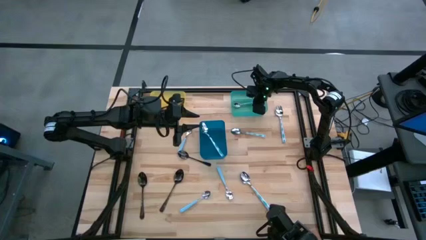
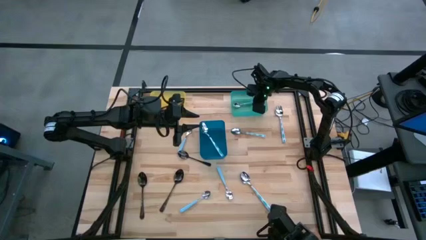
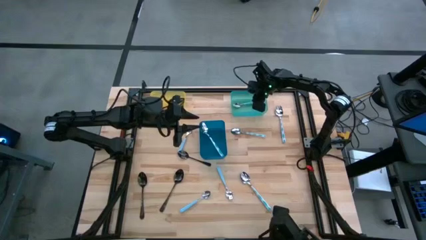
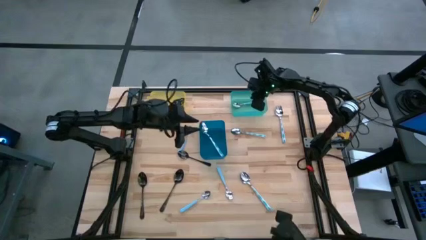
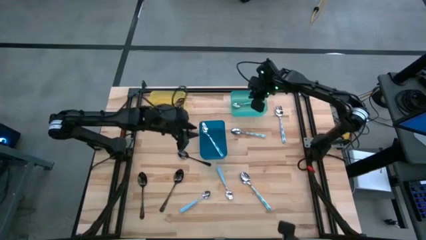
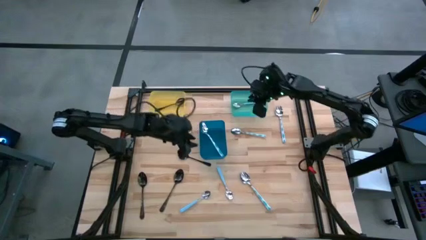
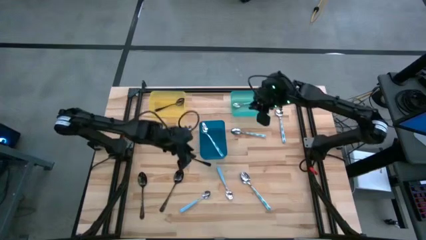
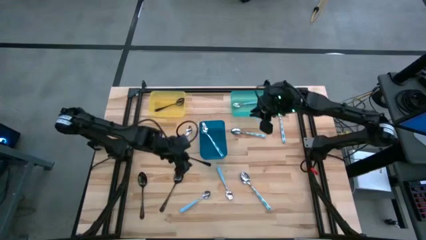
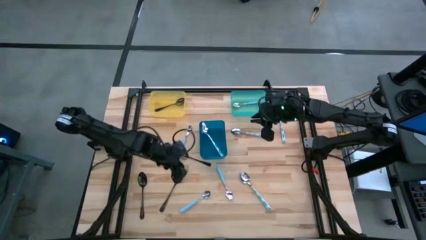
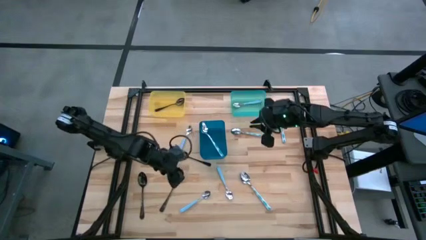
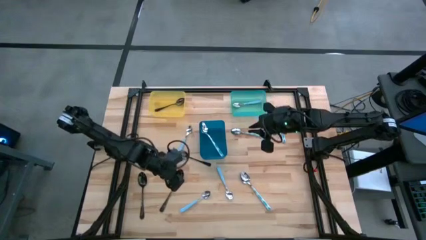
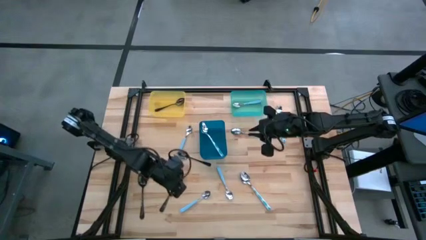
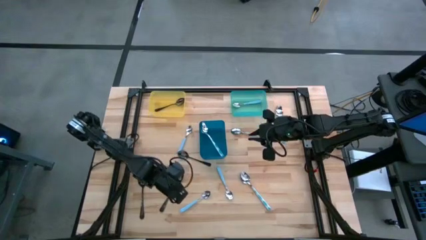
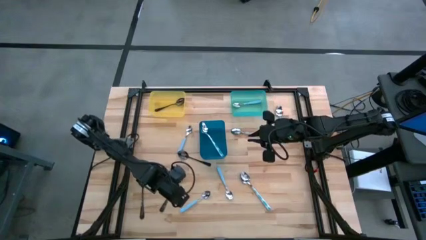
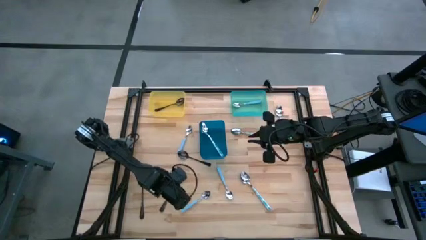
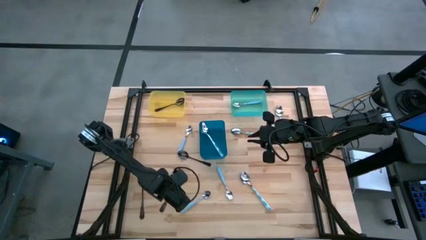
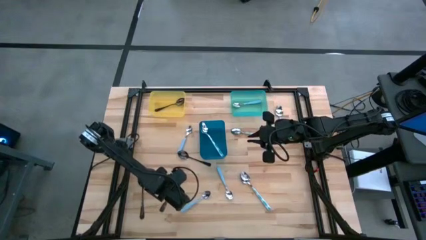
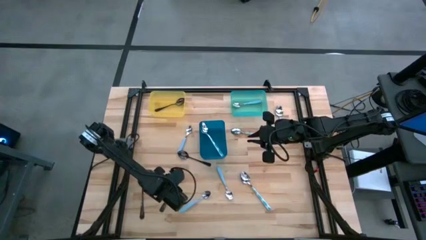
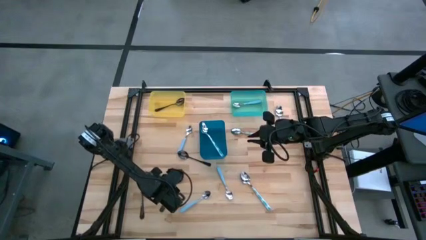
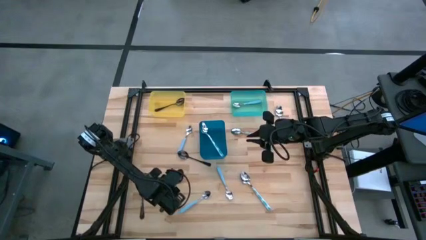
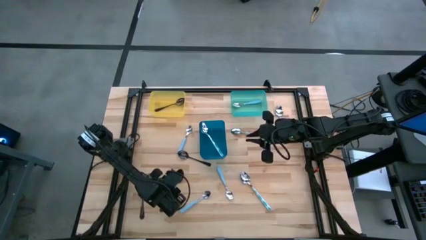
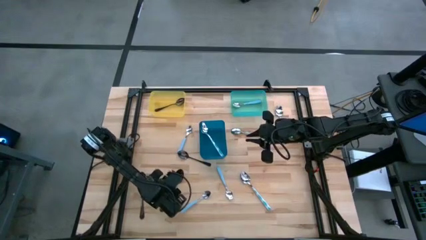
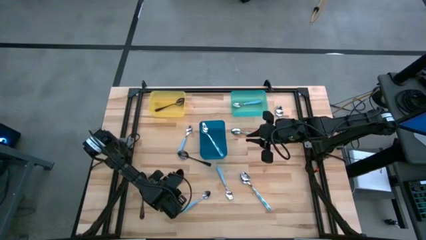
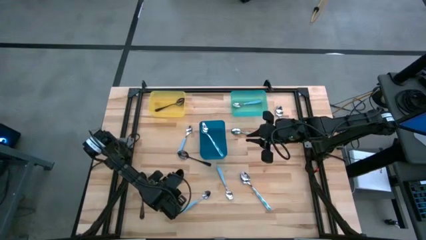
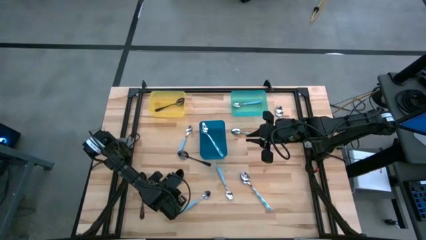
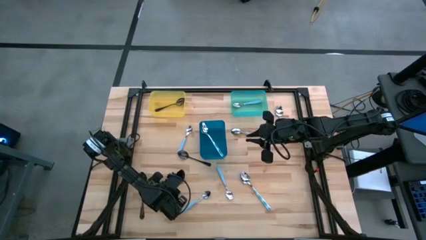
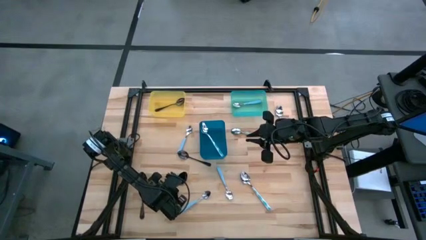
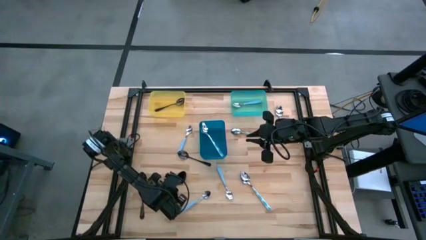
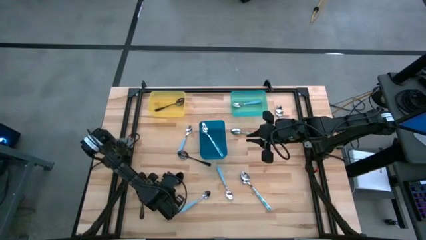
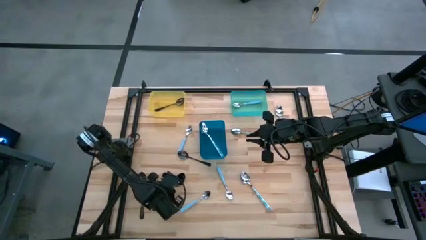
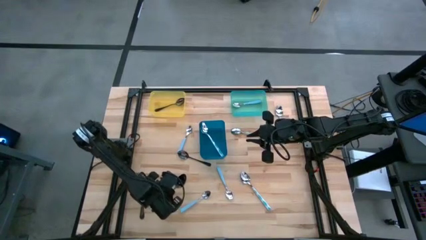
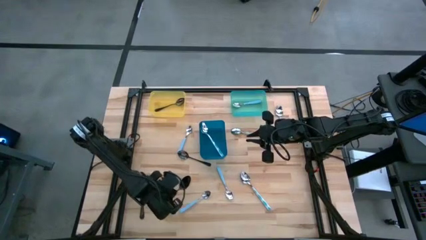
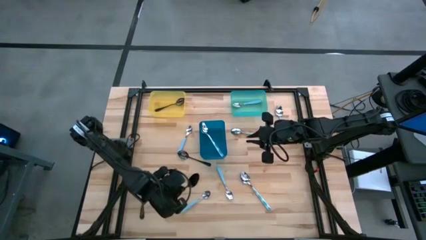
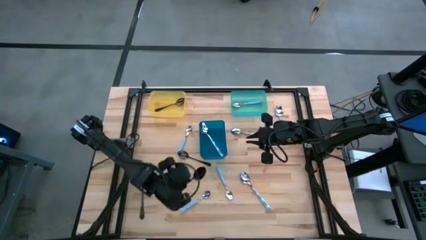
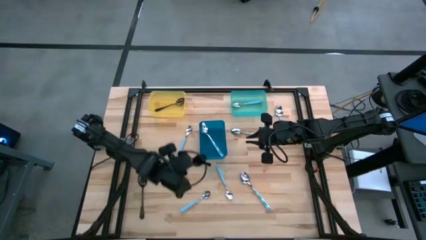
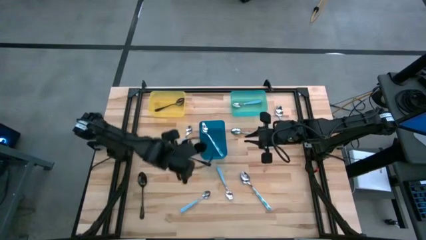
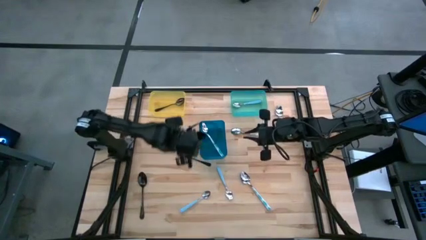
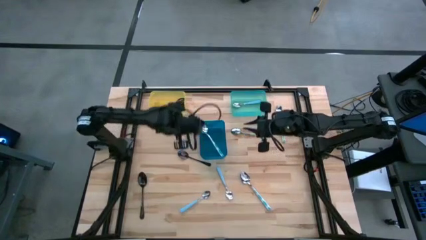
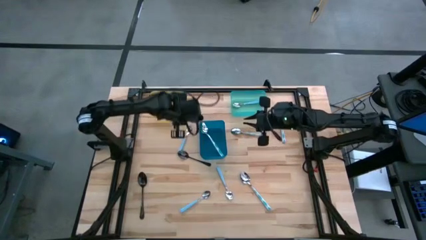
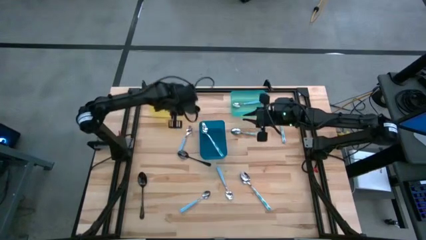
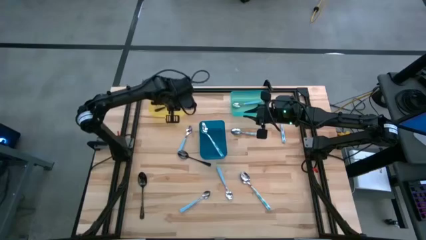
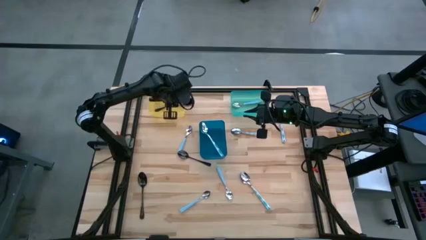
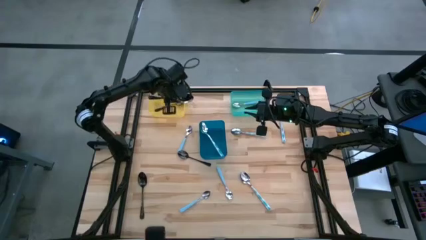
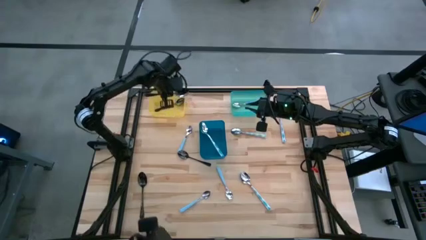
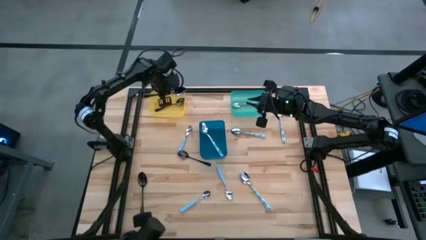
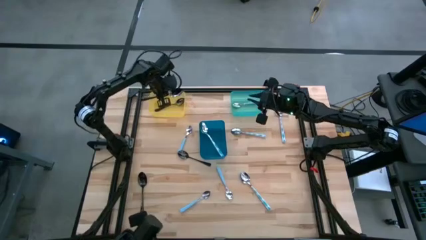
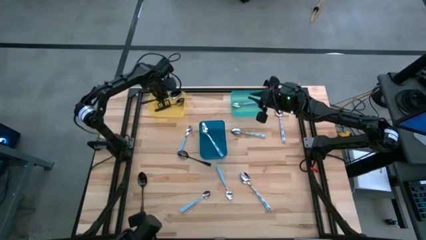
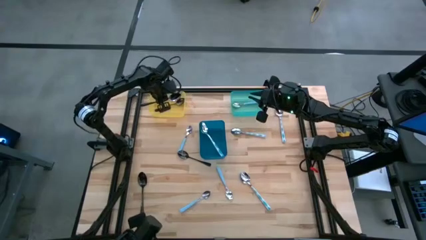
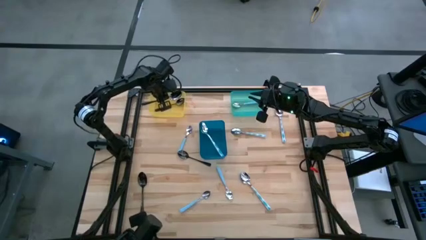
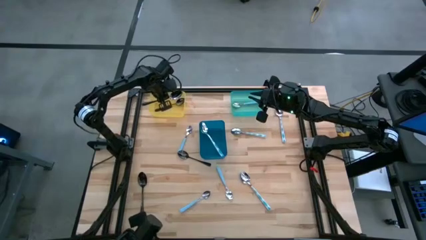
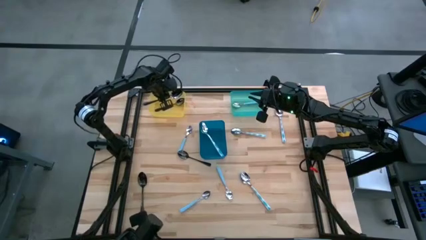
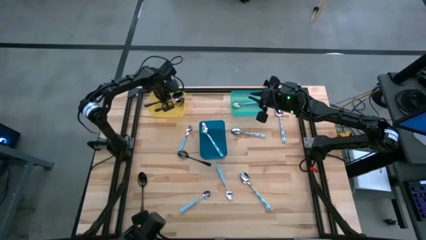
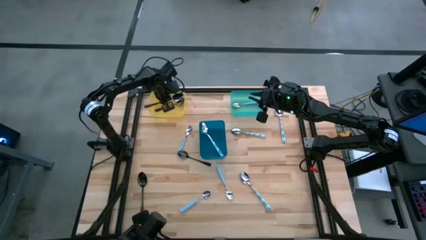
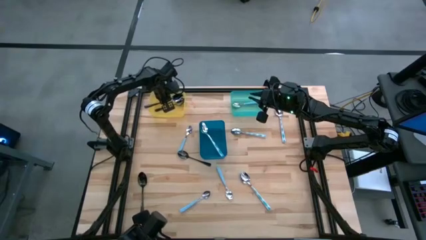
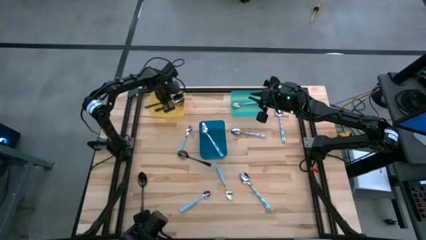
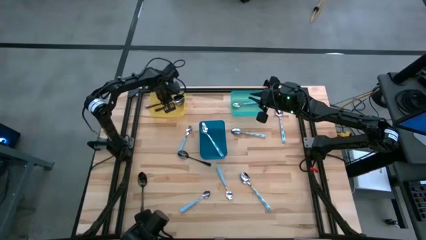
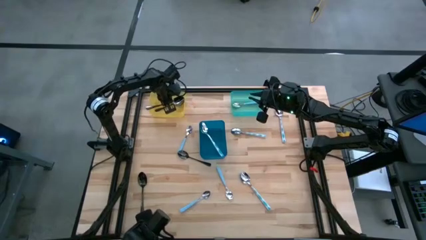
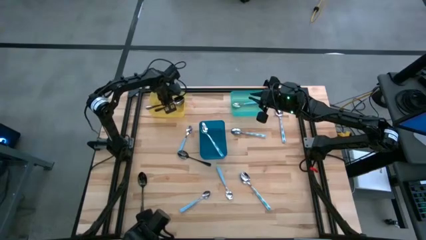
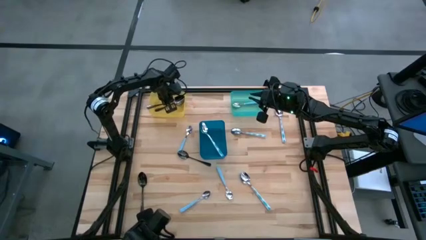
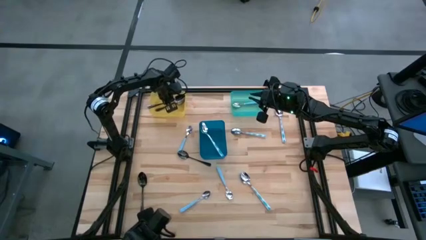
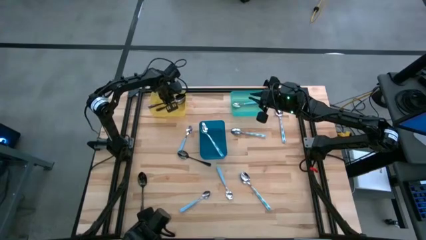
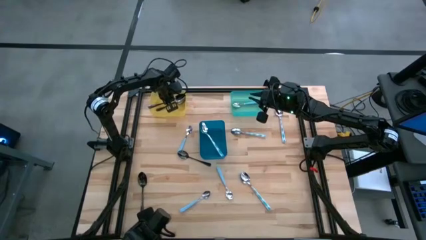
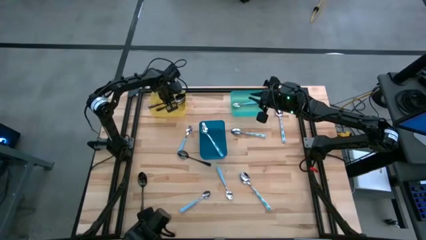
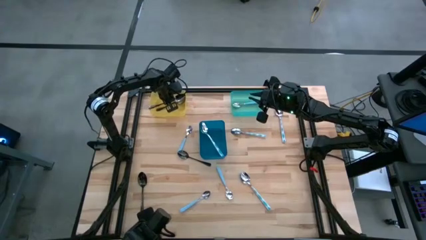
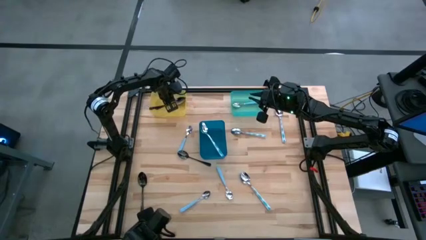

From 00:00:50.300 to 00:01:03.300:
Task: Sort silverware by color (type)
Put the black spoon into the yellow bin
